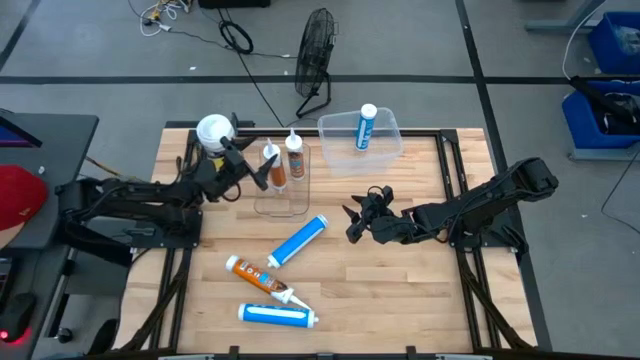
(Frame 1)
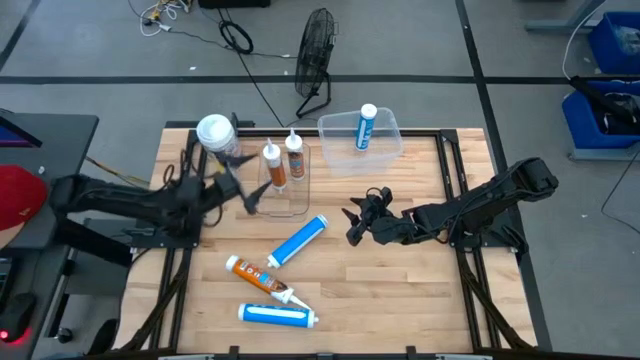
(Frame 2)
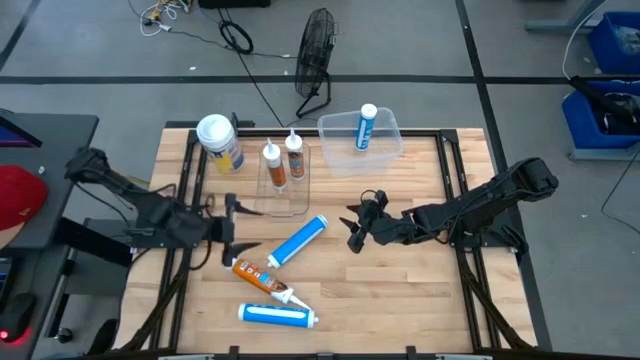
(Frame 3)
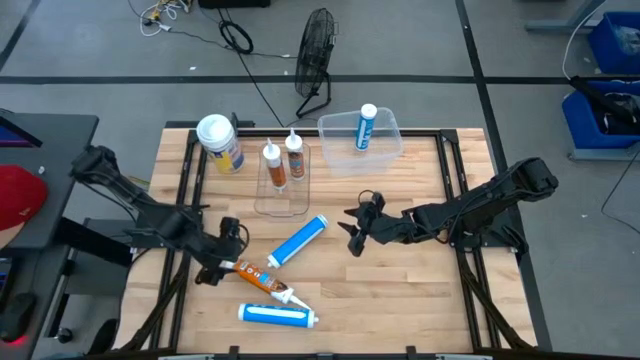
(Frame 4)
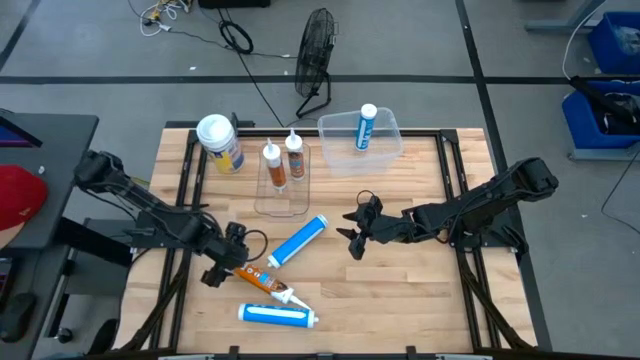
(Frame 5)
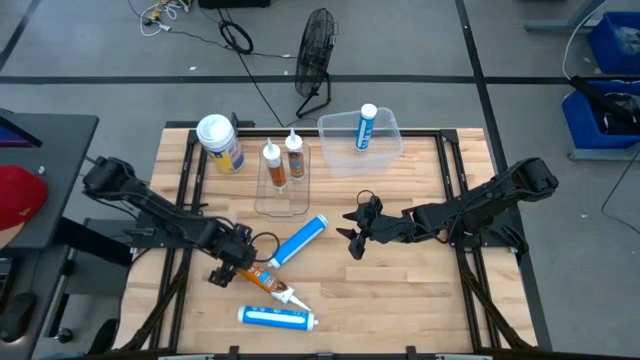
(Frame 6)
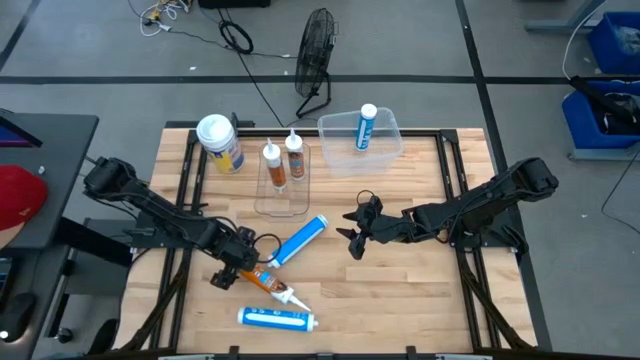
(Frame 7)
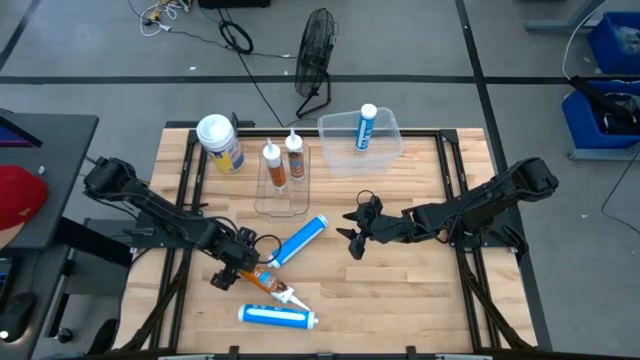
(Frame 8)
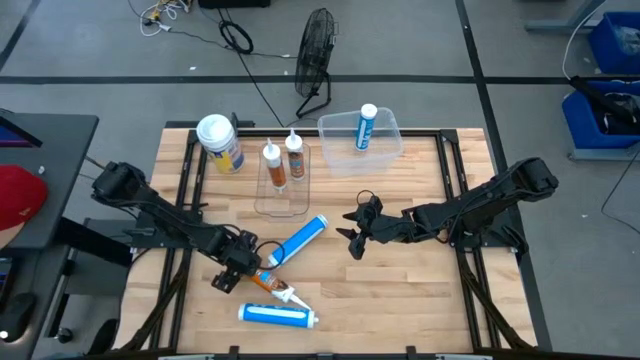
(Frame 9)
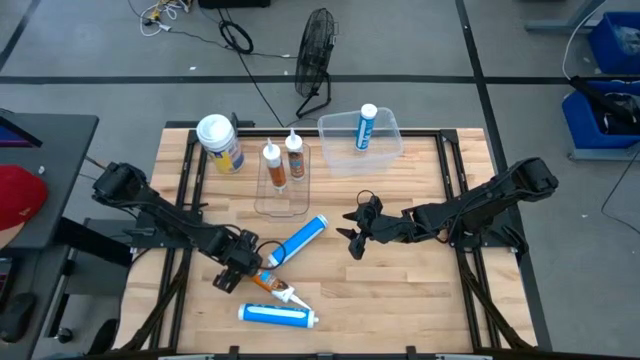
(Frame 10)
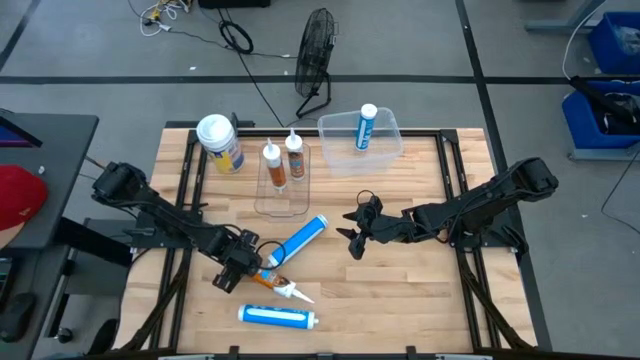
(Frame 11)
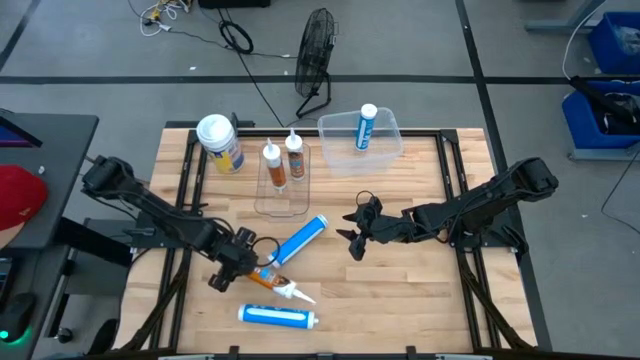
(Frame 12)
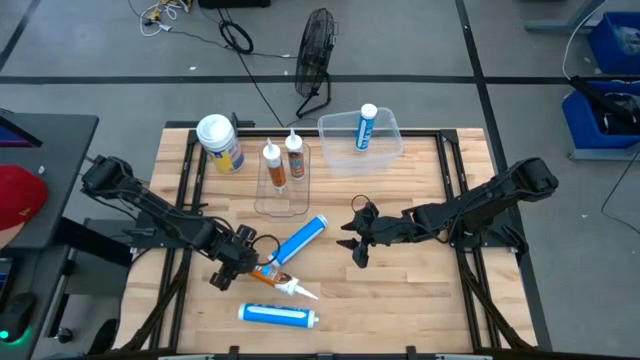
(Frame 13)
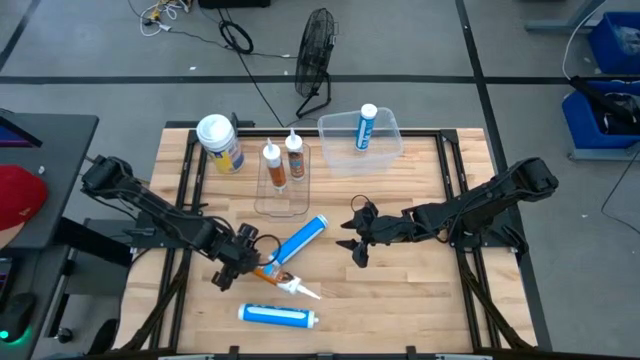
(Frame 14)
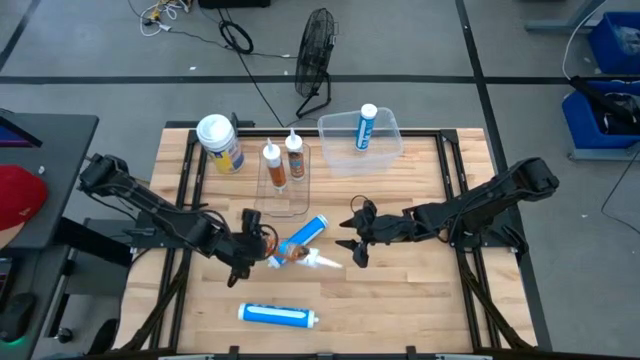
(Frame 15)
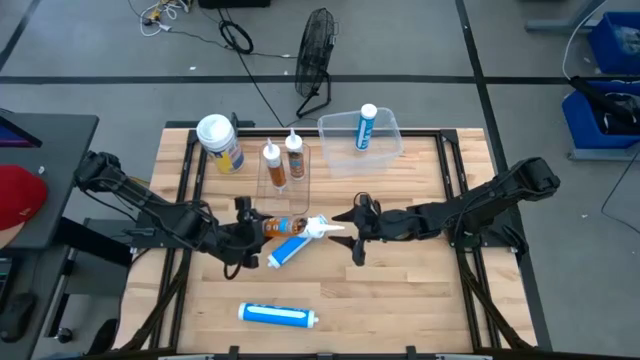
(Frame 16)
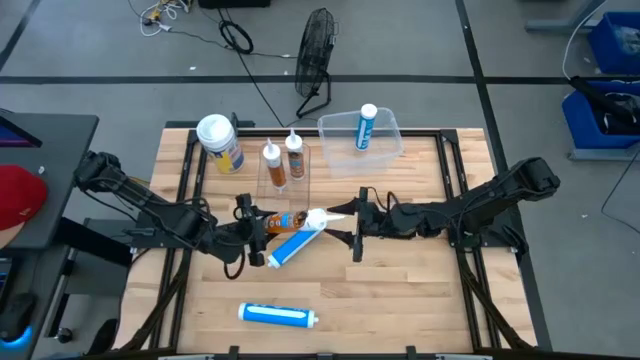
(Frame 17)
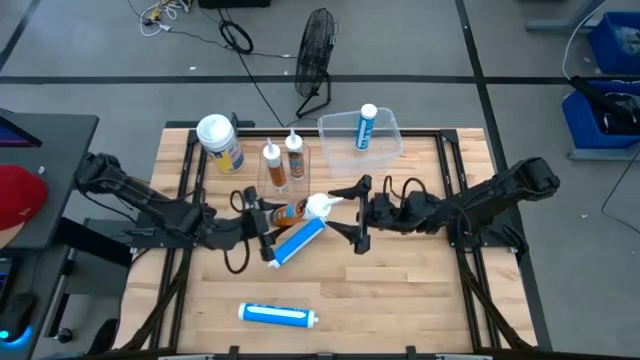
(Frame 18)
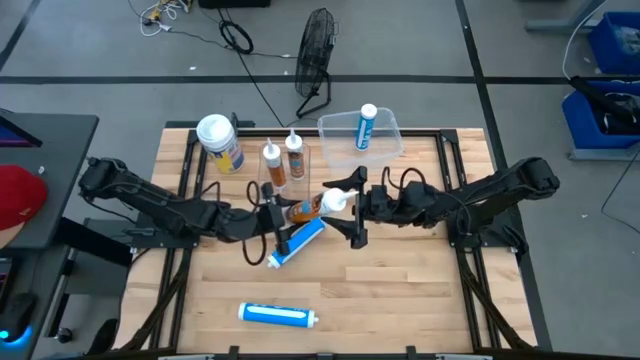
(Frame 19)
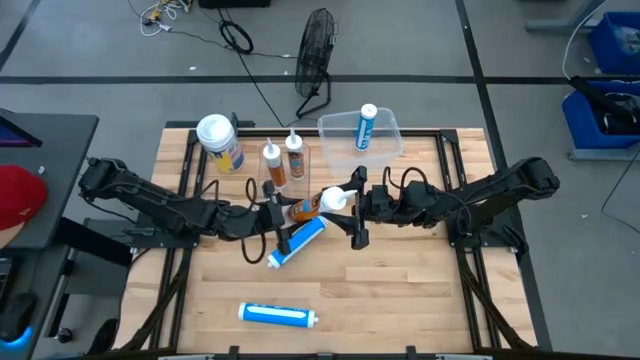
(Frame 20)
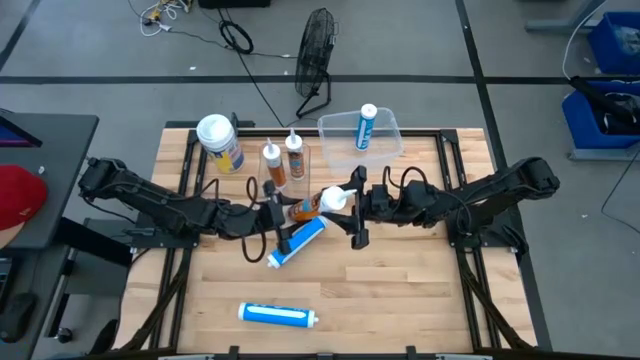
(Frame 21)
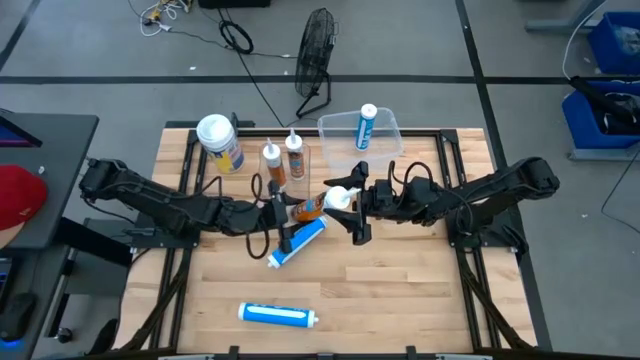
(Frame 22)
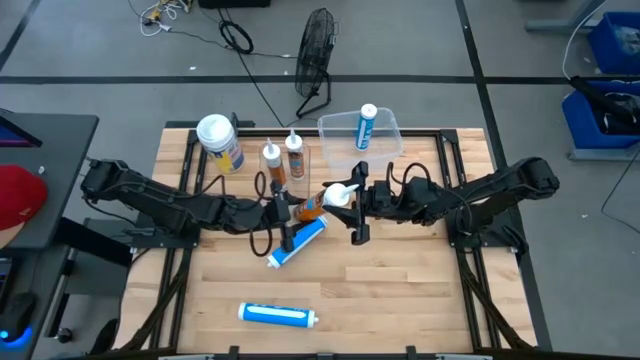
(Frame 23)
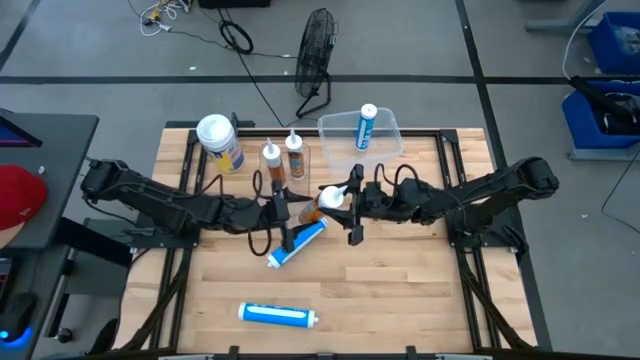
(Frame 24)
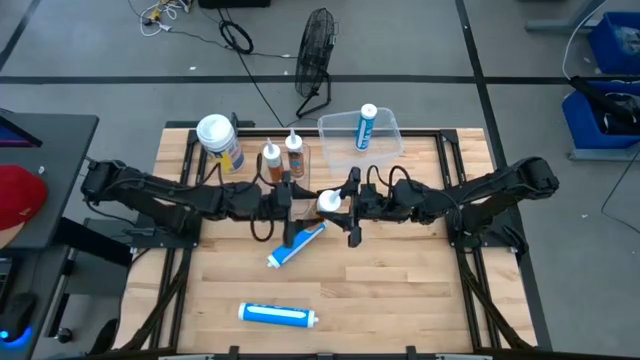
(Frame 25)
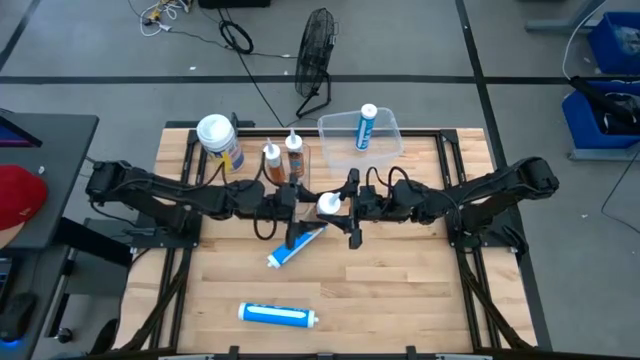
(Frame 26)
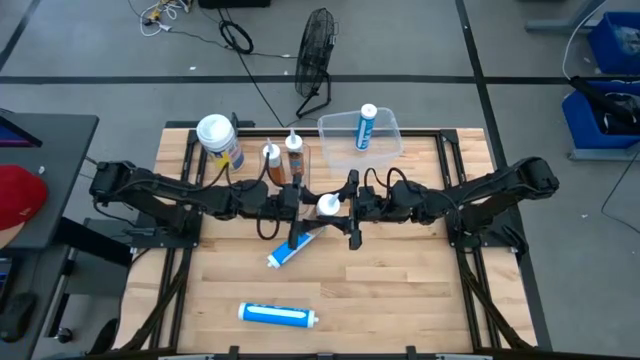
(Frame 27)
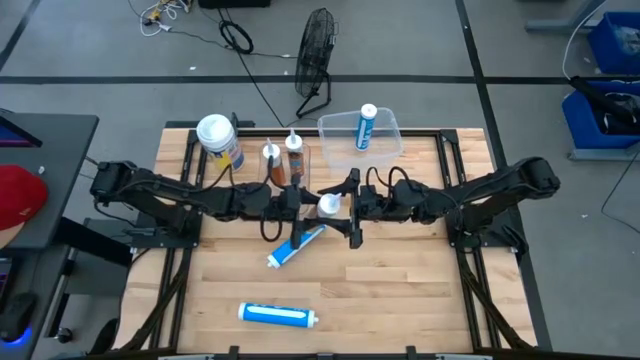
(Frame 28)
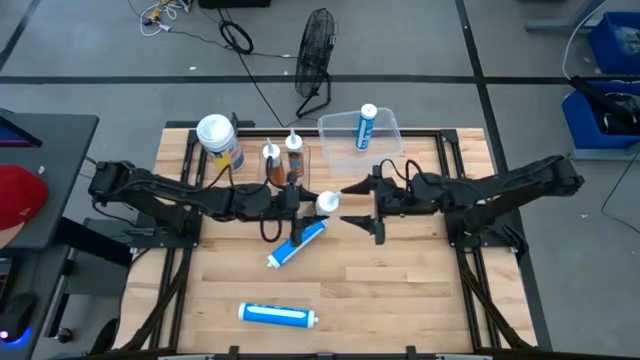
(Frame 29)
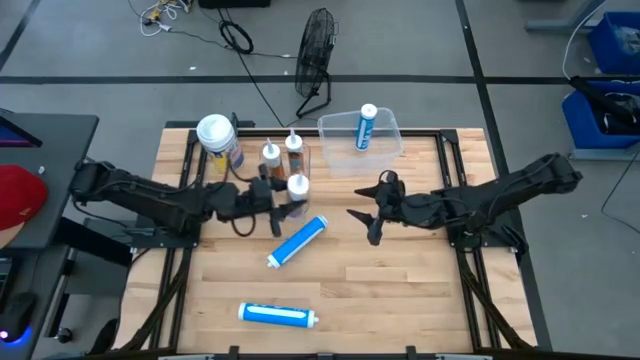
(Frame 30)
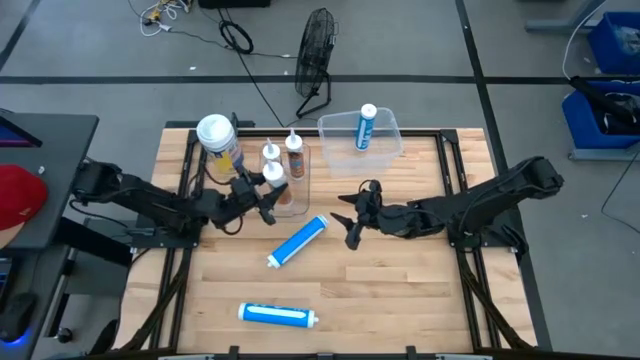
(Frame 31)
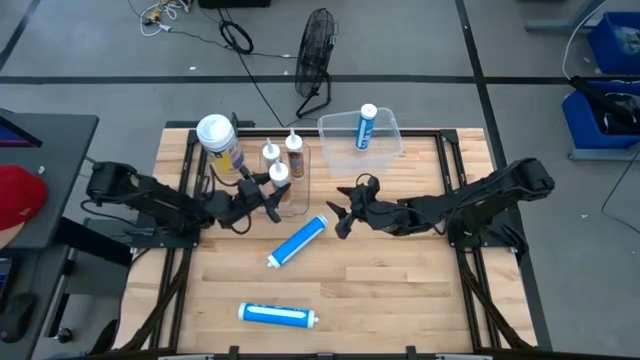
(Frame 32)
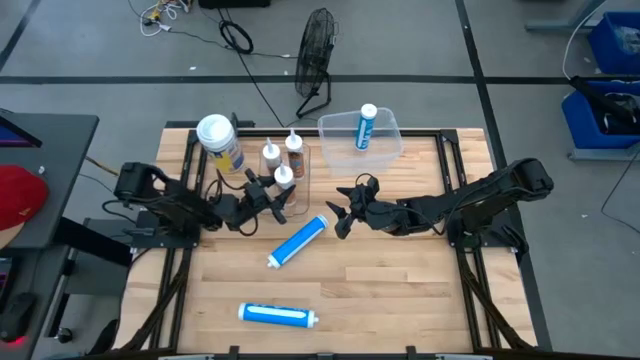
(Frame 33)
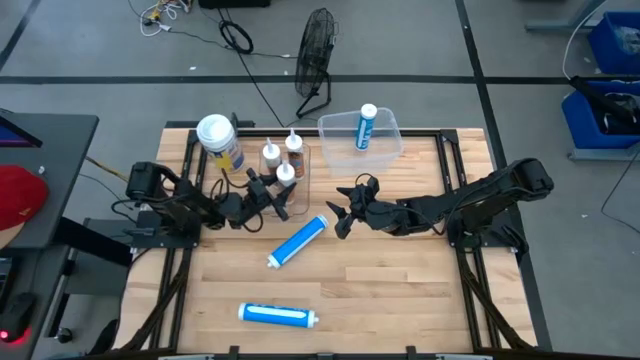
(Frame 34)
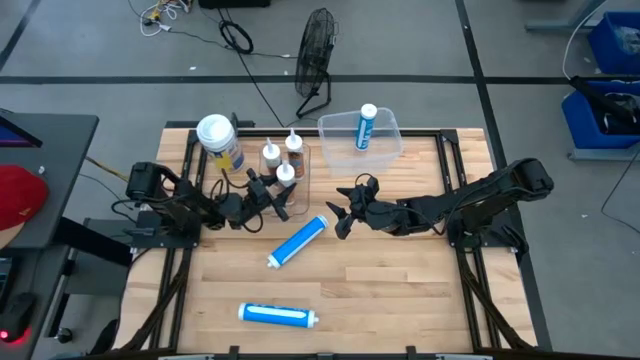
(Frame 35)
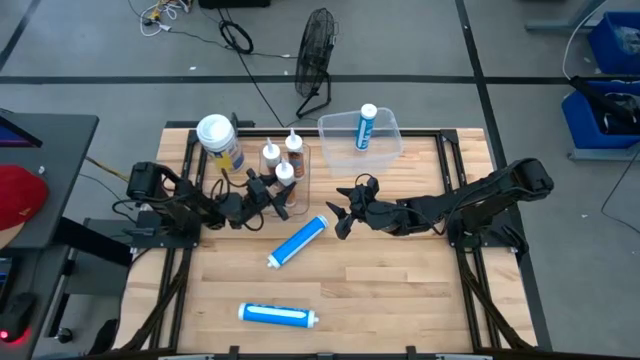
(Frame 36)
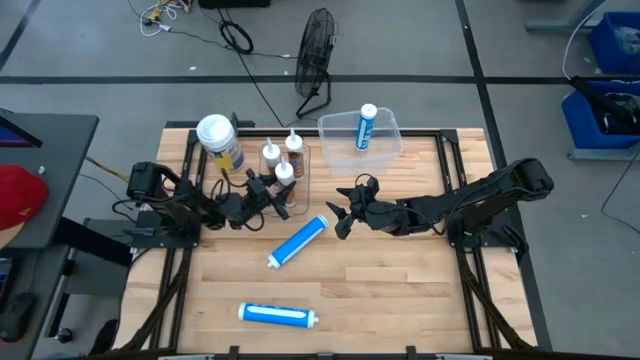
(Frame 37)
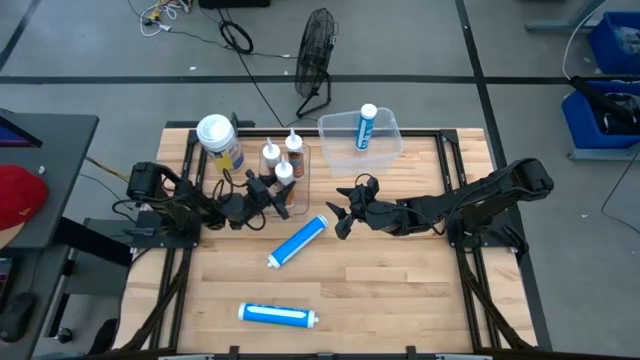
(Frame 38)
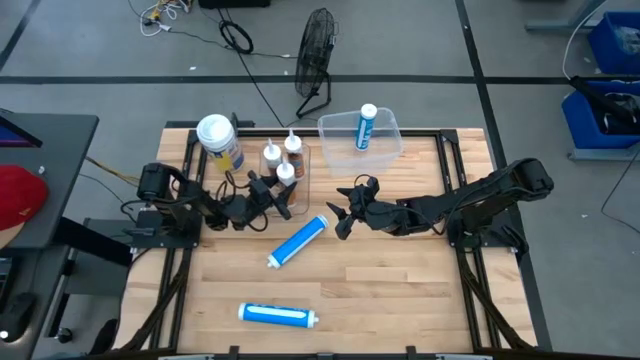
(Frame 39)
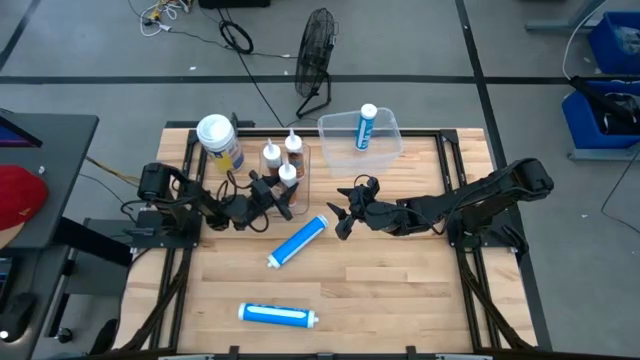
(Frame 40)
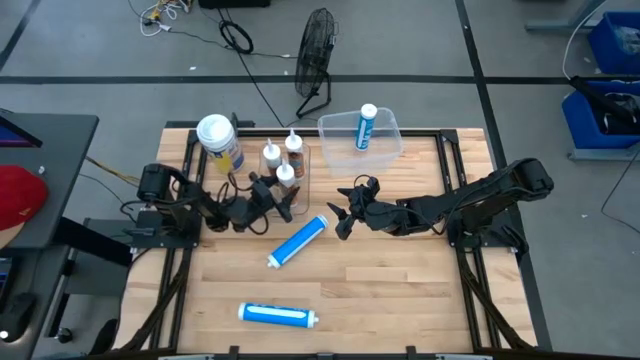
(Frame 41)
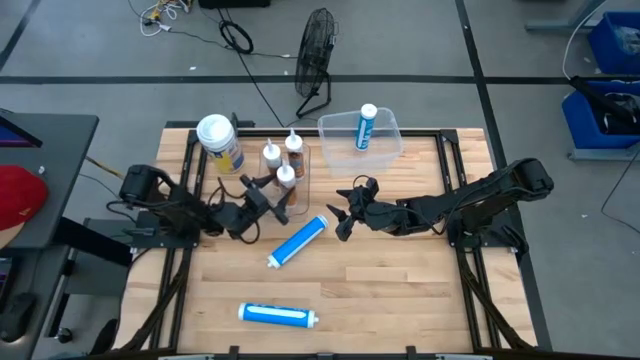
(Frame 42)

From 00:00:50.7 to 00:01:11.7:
Task: Pick & place silicon tubes, Sealant and Lysol wipes
Put the orange sealant into the transparent bin
